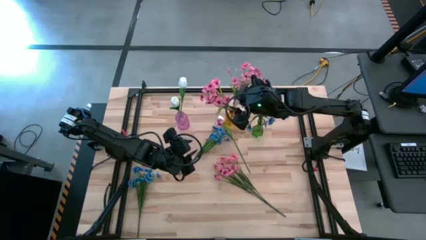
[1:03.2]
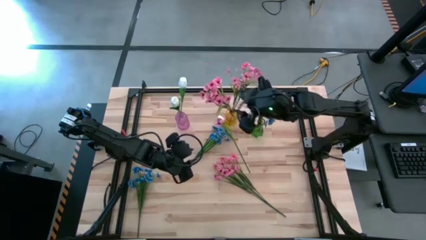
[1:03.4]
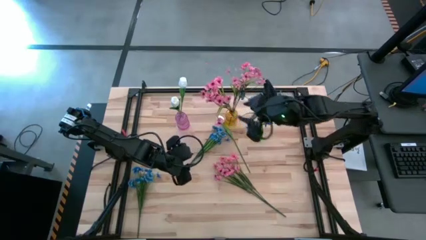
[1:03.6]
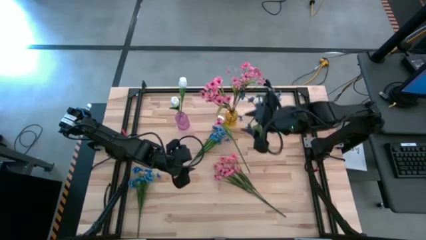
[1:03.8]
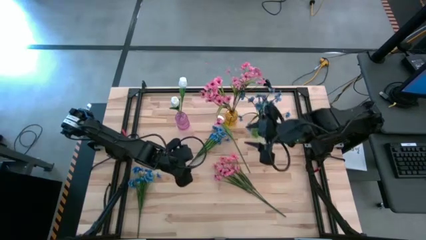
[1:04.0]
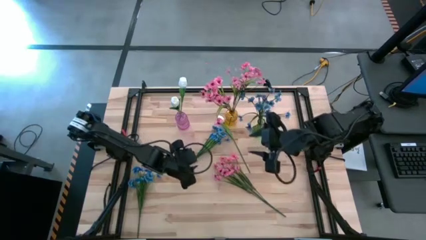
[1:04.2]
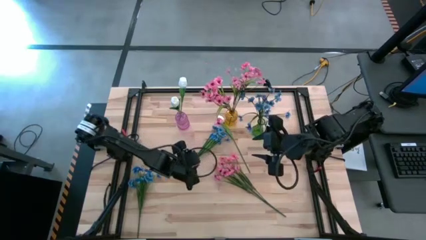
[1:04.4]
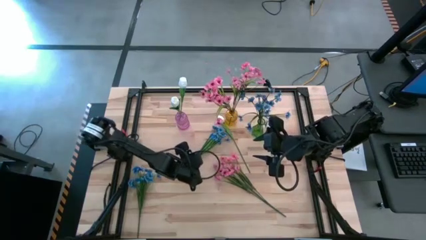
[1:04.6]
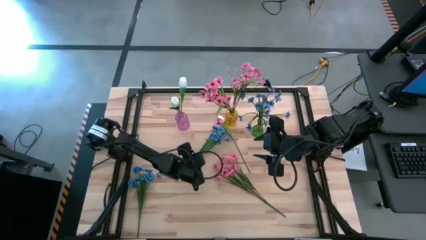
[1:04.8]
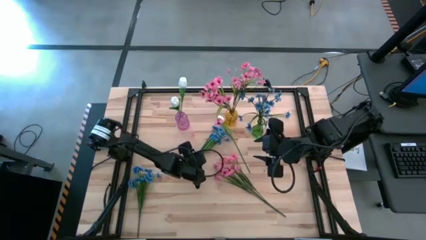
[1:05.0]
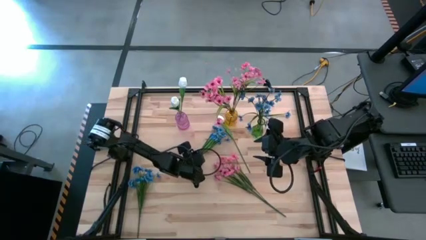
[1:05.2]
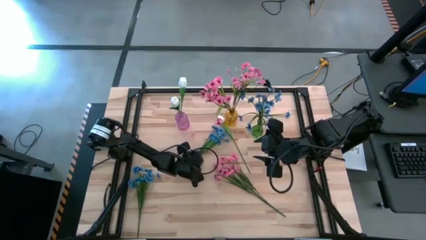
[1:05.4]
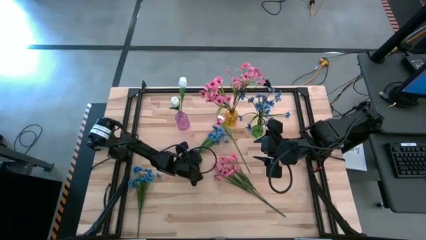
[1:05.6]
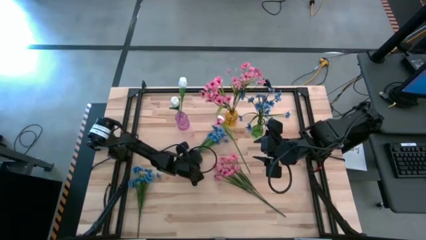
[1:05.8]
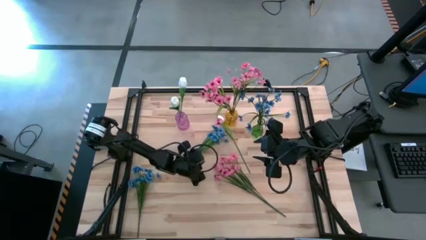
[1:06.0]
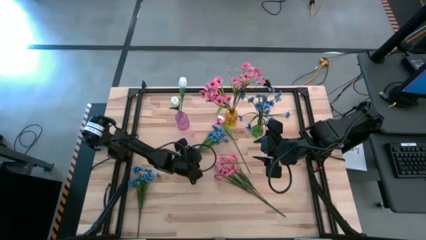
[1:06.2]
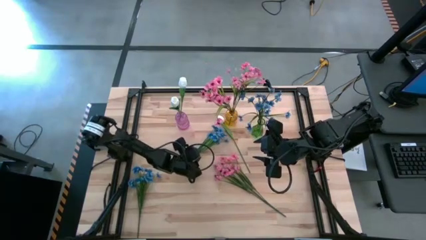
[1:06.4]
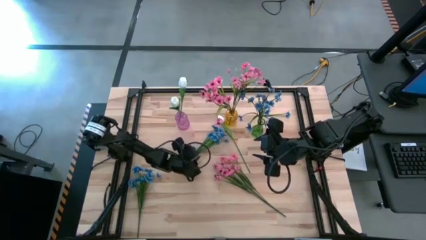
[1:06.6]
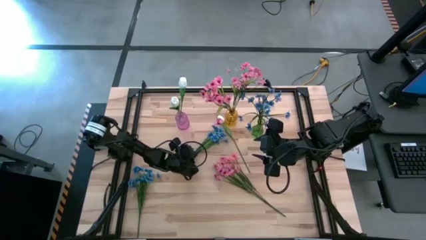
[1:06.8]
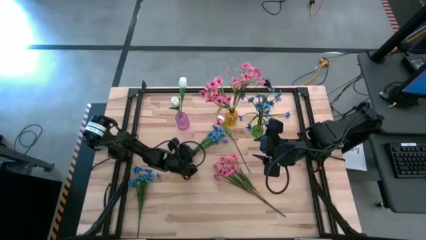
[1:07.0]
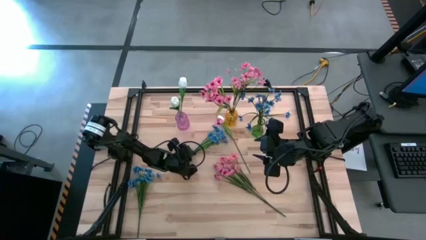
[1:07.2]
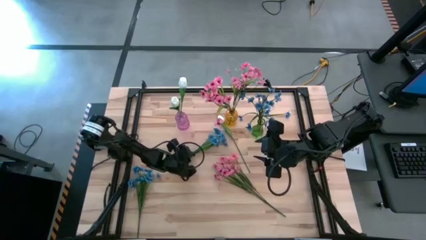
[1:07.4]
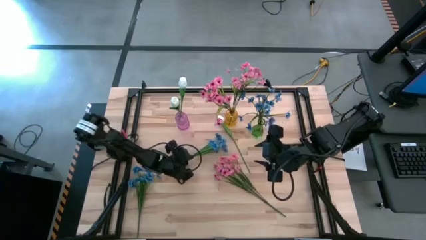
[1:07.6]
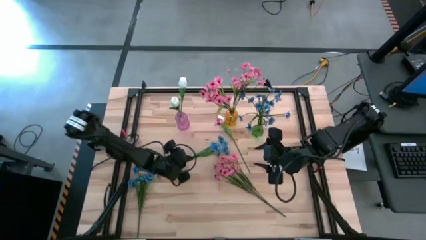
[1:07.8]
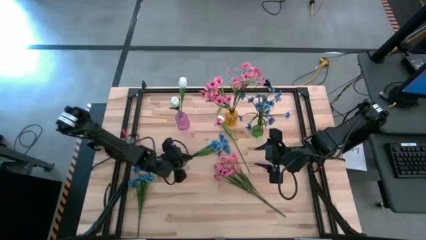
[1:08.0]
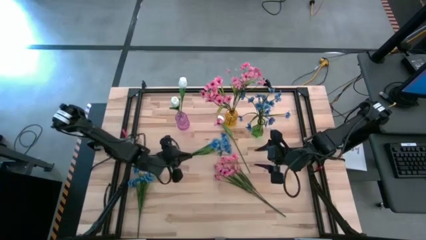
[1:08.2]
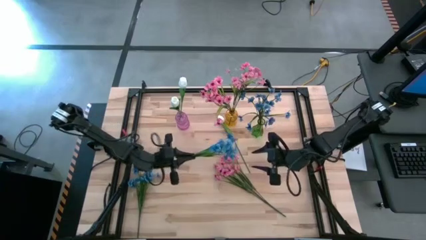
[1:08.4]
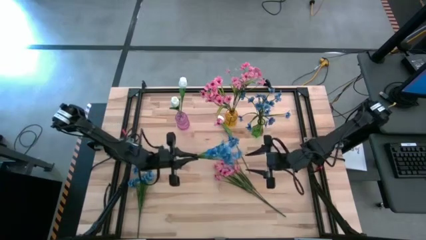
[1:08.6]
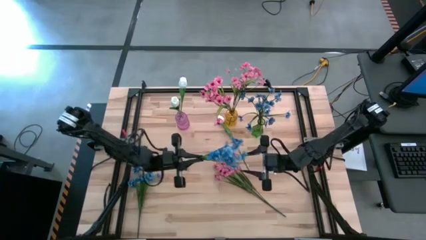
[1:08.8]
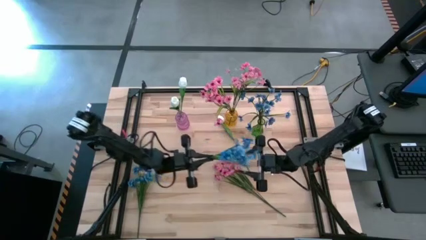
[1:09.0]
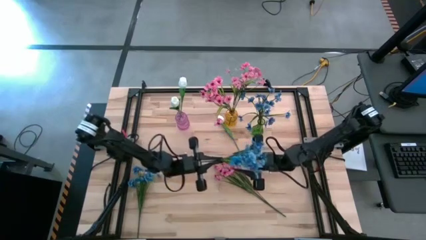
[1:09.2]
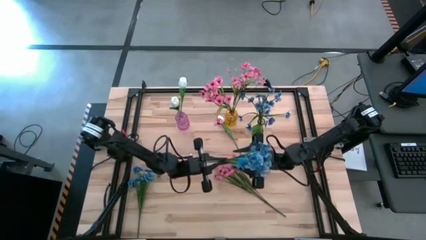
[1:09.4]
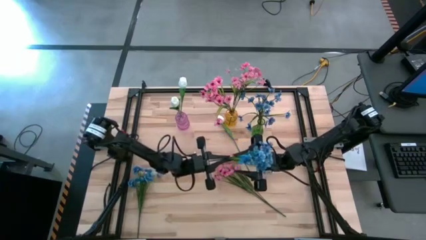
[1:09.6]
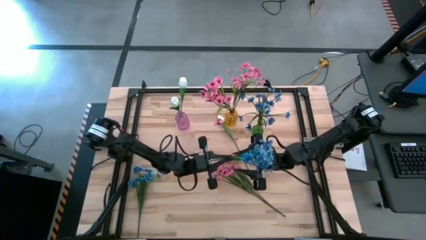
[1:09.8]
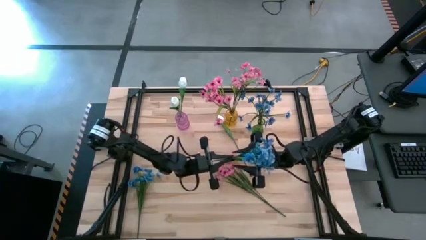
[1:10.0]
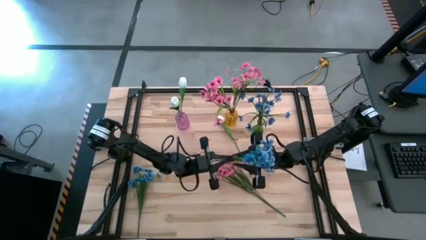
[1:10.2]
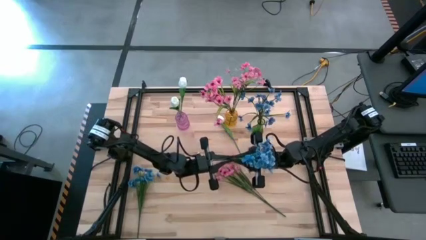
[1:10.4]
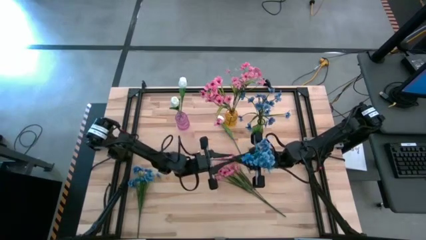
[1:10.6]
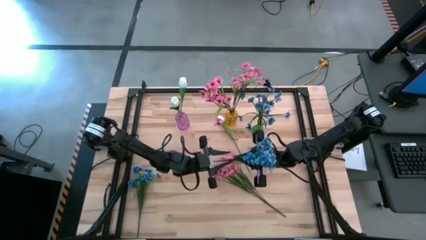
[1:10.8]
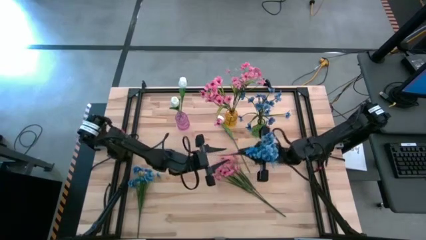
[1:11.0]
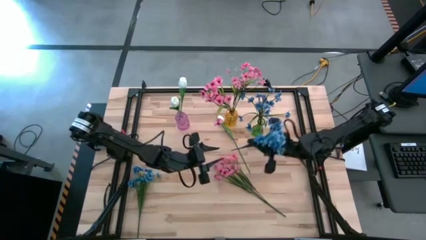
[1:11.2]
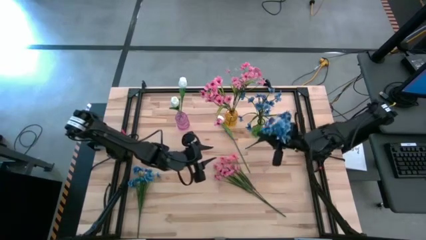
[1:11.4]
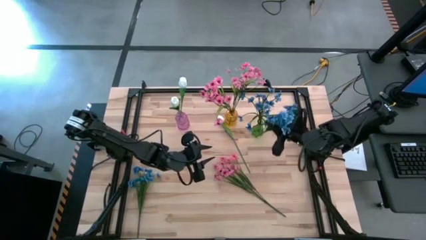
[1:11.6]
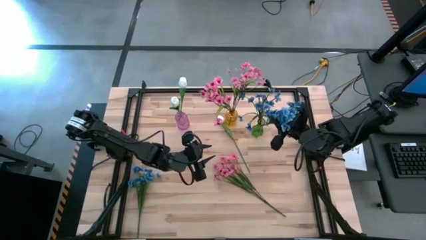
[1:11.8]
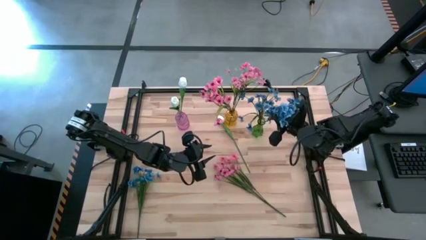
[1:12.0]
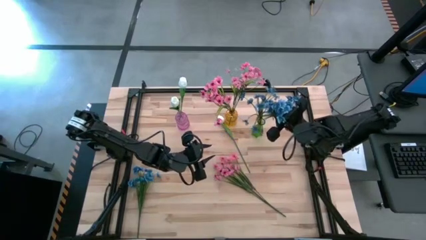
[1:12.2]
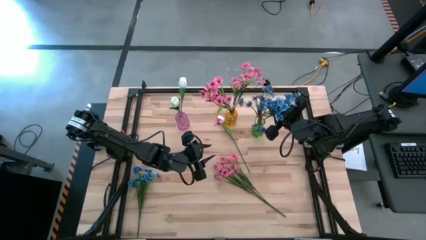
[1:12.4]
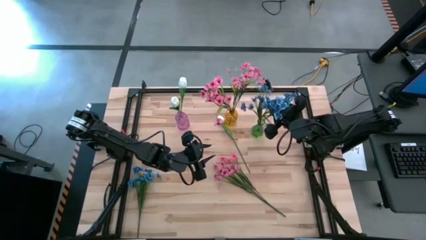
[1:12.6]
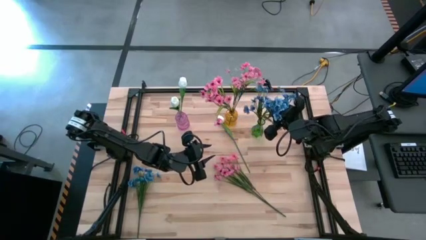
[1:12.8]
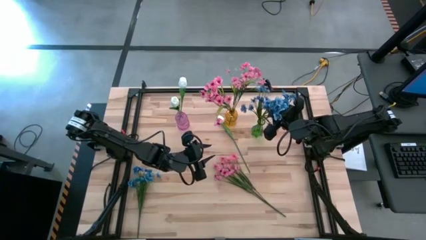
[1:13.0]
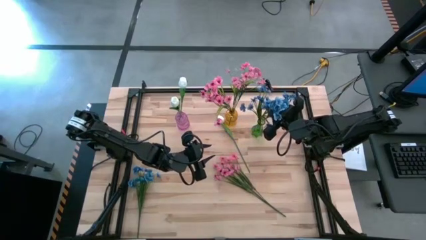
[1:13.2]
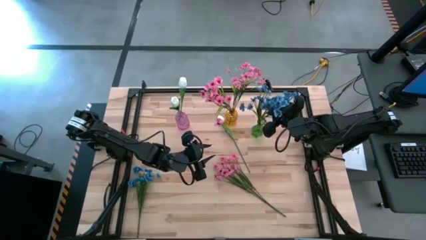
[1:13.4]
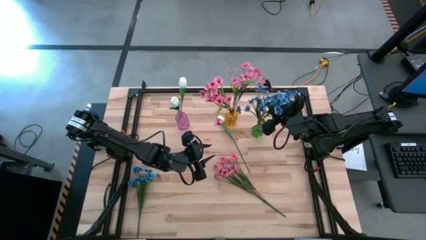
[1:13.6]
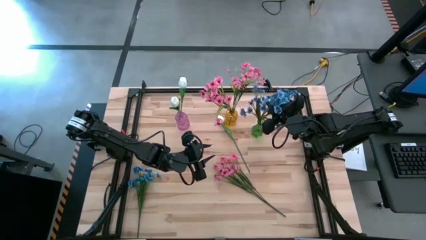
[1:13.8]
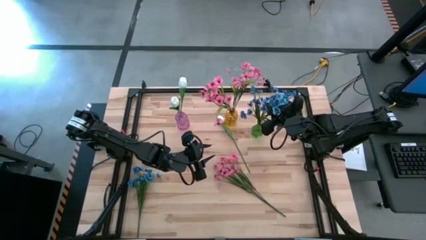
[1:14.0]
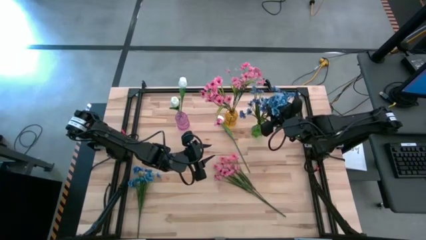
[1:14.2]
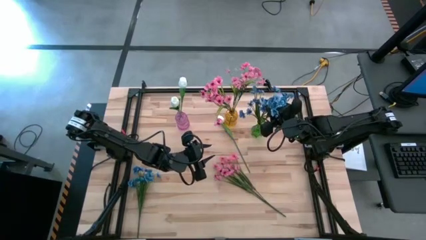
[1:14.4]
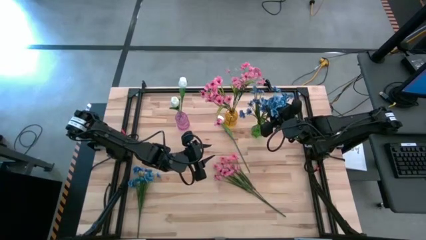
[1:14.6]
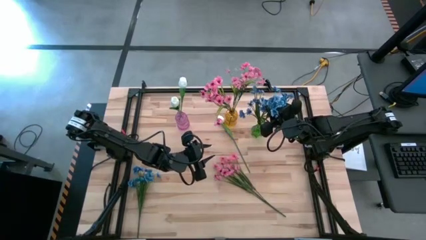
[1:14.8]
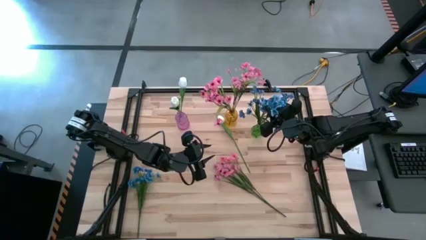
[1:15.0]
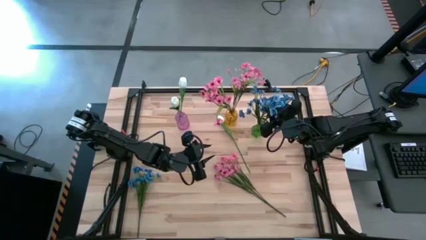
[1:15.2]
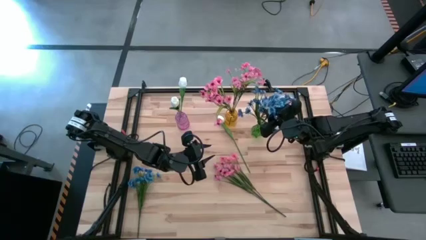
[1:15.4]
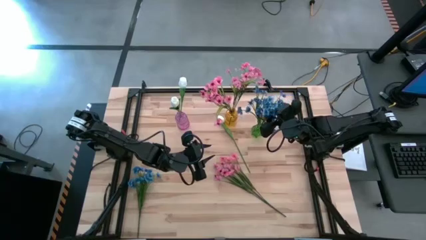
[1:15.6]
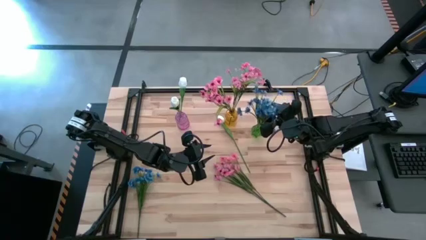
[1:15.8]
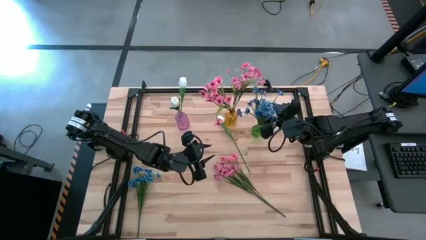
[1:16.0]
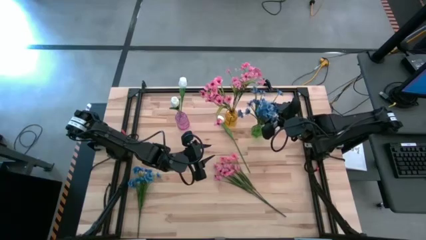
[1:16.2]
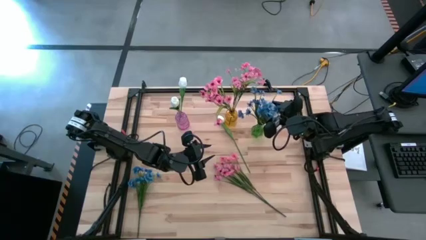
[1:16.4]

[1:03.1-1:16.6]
Task: Sort flowers into vase by color
Put the top blue flowers into the green vase

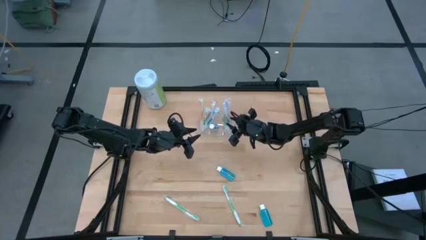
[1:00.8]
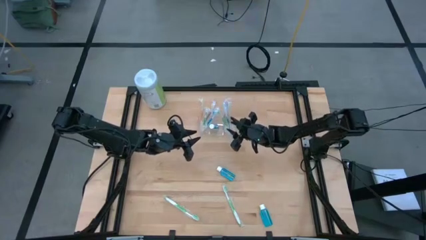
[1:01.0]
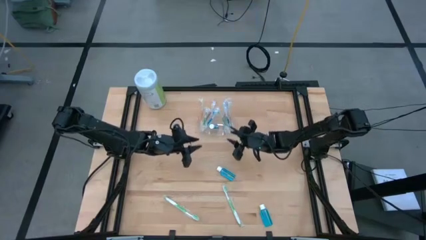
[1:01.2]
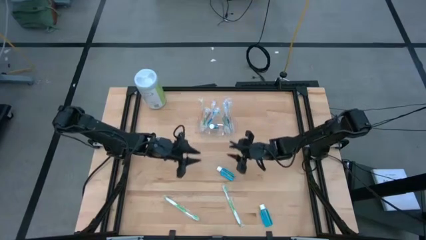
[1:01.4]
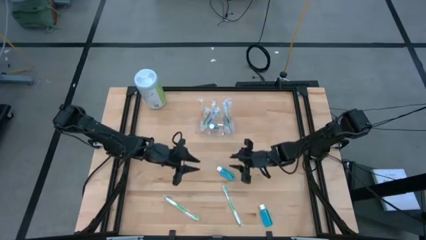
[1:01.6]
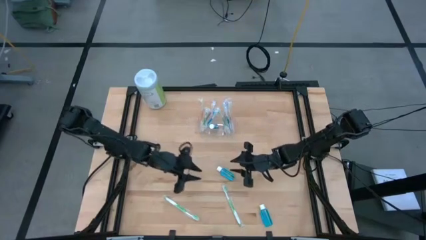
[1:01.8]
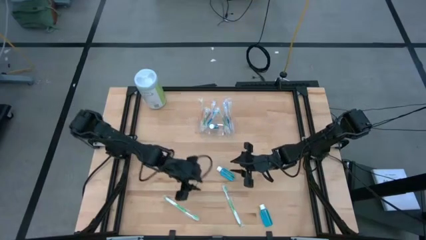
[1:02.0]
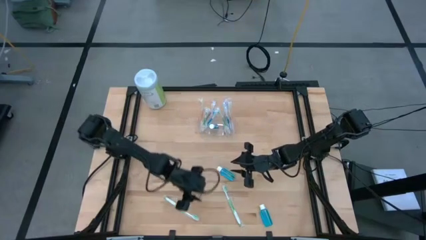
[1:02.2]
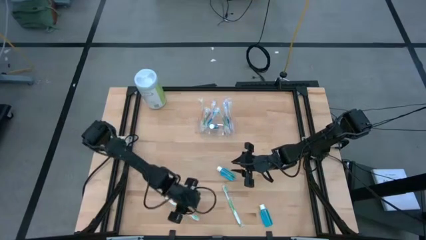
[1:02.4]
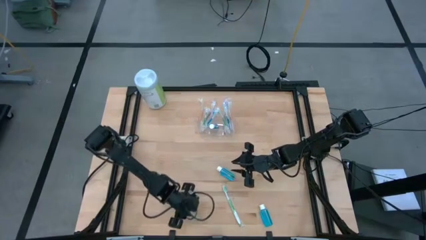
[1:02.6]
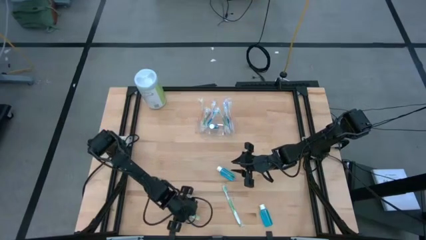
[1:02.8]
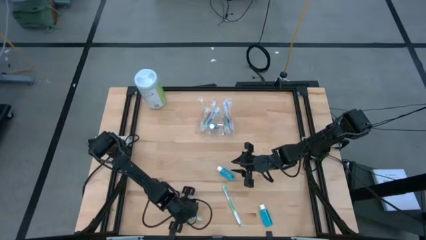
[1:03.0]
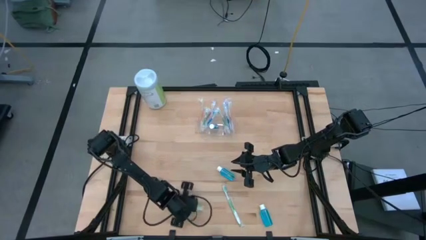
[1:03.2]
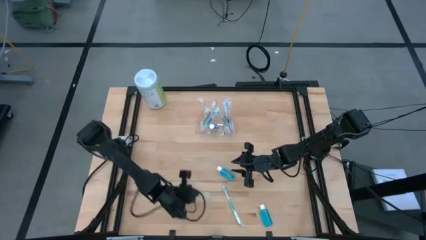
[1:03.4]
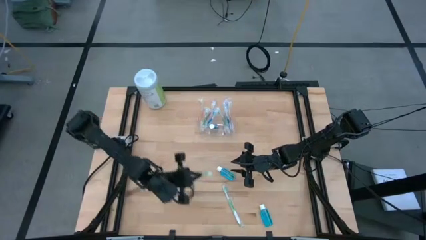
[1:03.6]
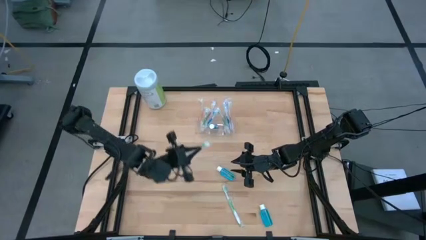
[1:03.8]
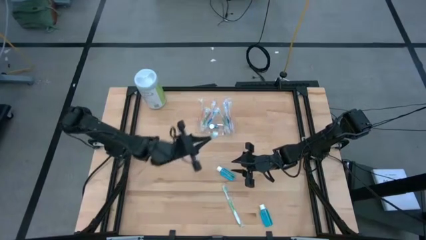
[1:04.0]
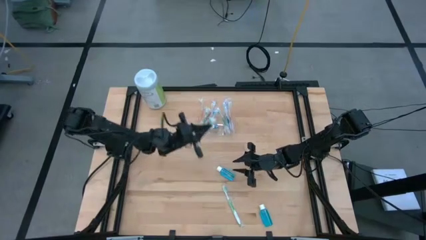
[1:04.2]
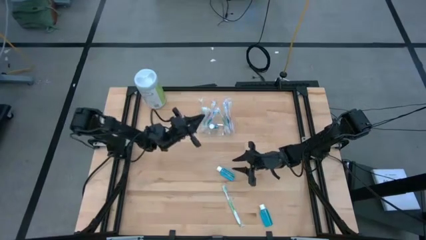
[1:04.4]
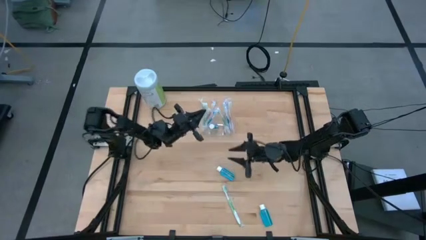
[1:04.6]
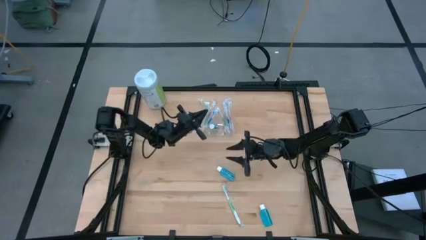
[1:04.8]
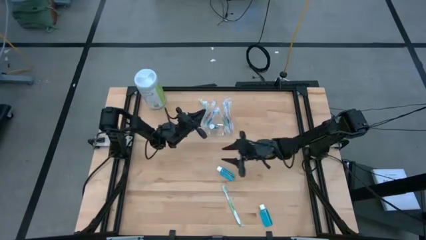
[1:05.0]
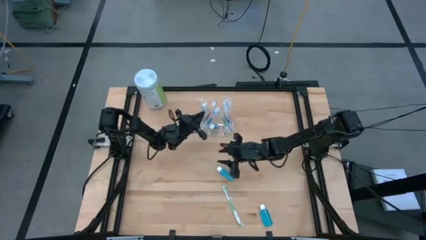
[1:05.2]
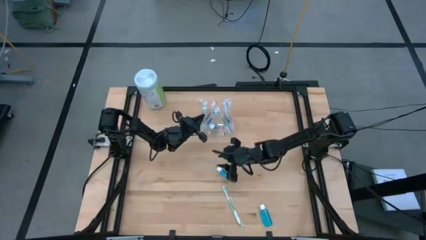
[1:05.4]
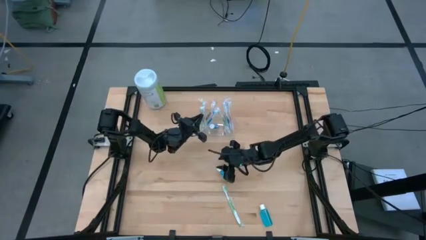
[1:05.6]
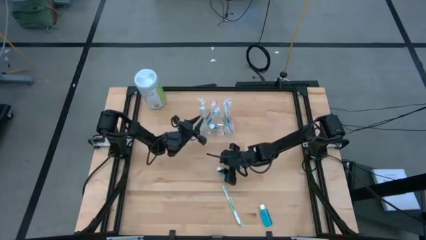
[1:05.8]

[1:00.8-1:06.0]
Task: Pick & Place toothbrushing station
Put the green toothbrush to the left of the transparent organizer
